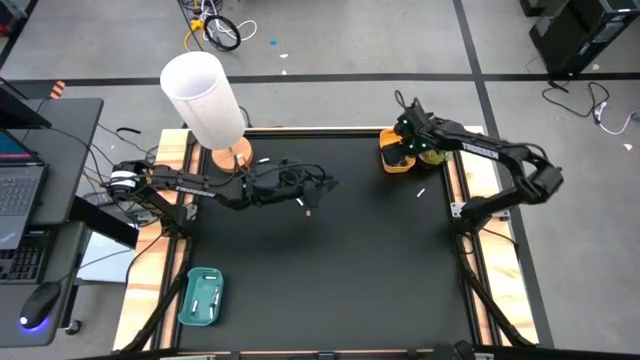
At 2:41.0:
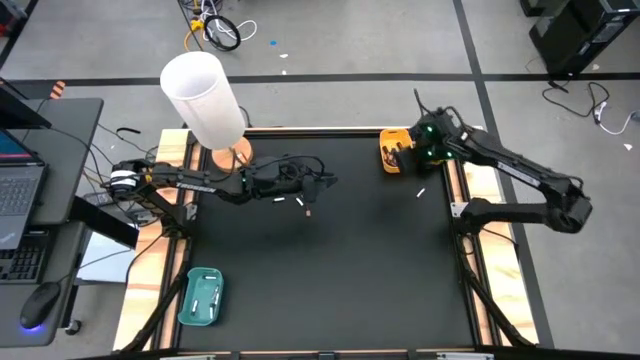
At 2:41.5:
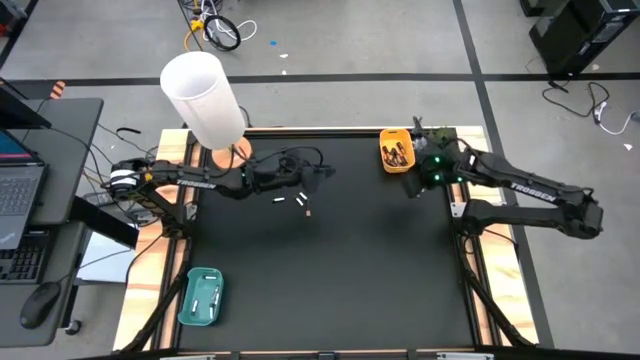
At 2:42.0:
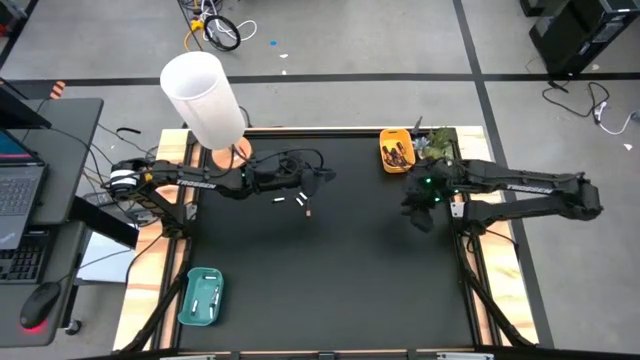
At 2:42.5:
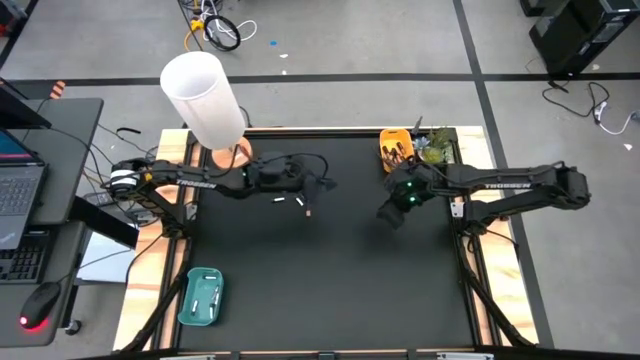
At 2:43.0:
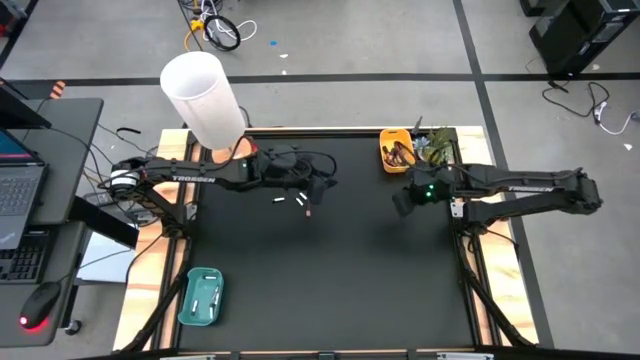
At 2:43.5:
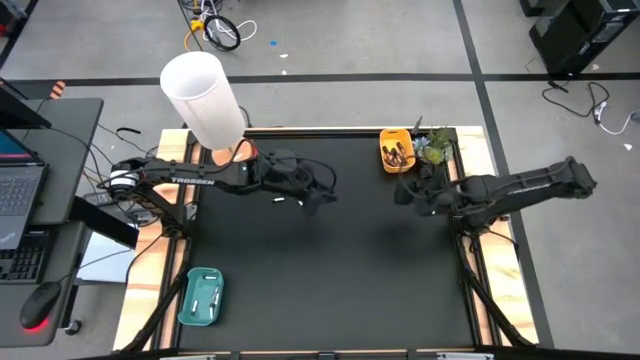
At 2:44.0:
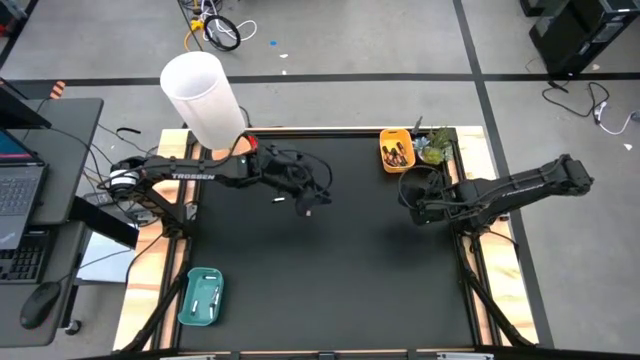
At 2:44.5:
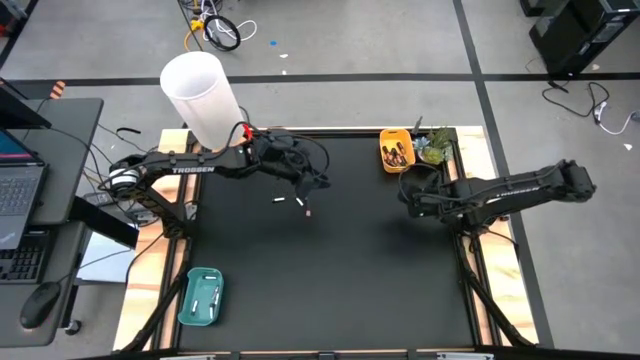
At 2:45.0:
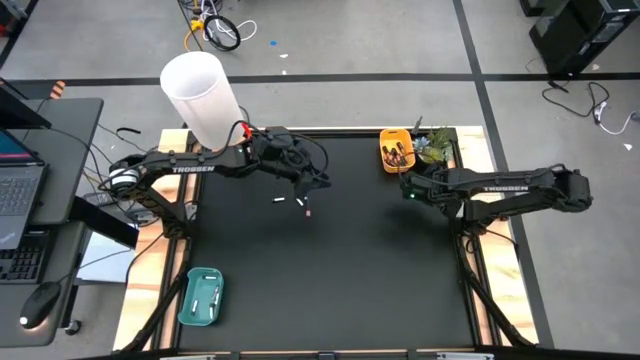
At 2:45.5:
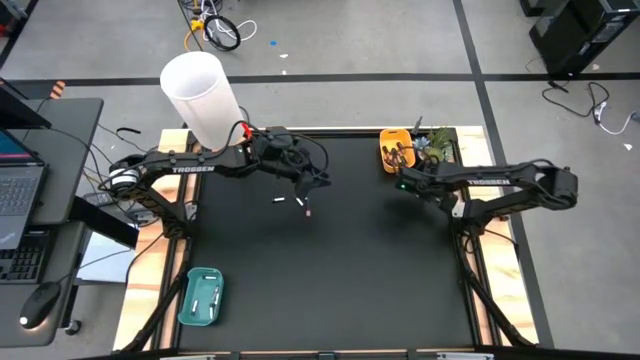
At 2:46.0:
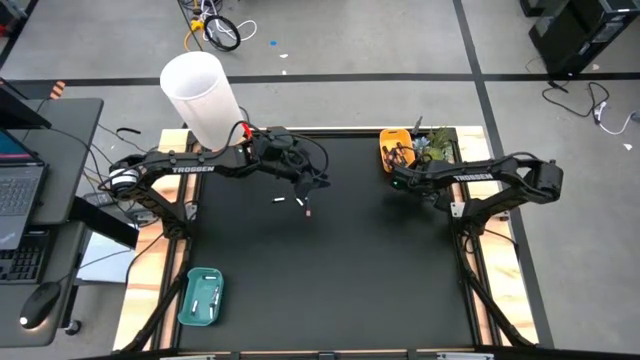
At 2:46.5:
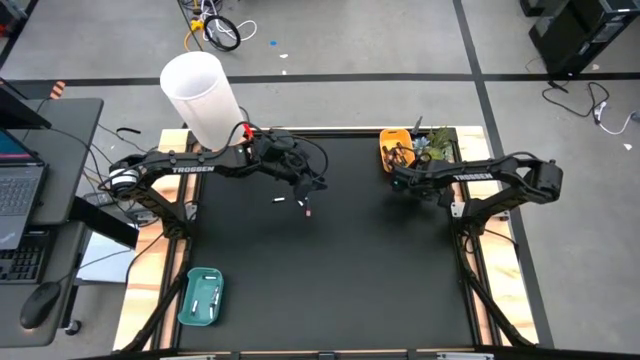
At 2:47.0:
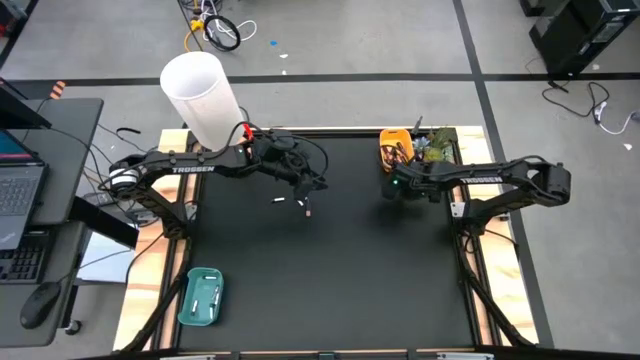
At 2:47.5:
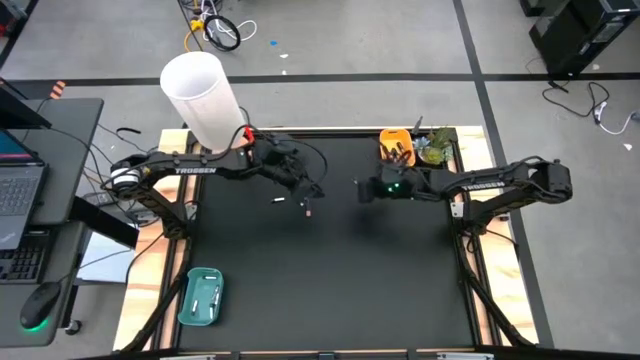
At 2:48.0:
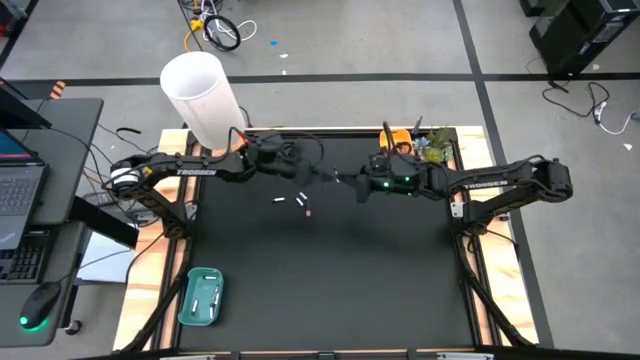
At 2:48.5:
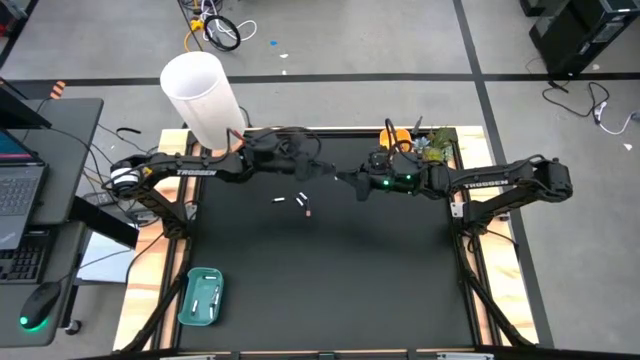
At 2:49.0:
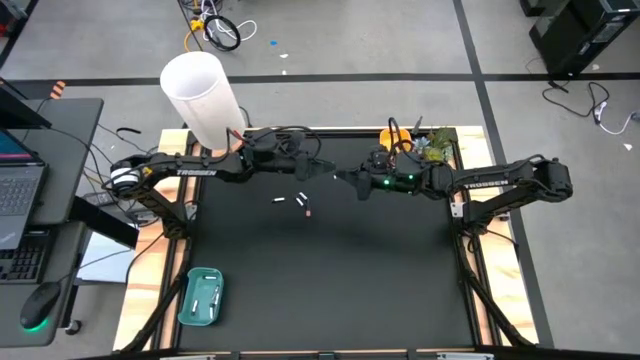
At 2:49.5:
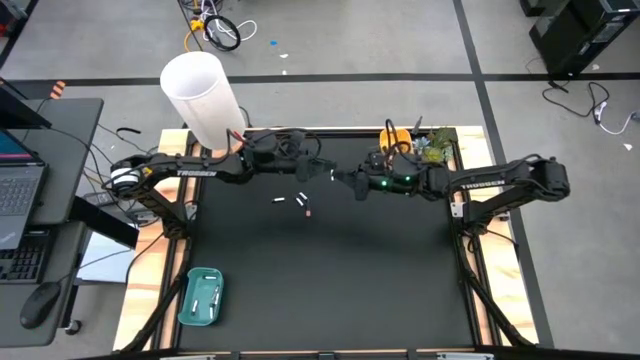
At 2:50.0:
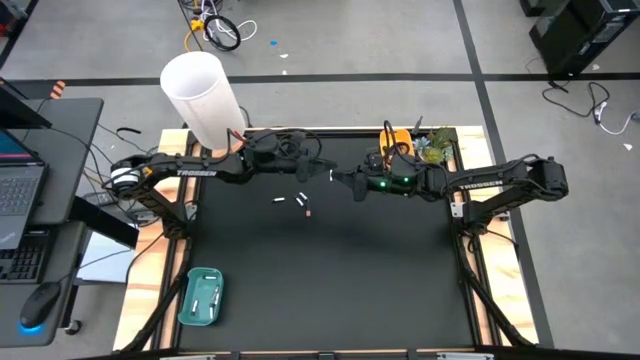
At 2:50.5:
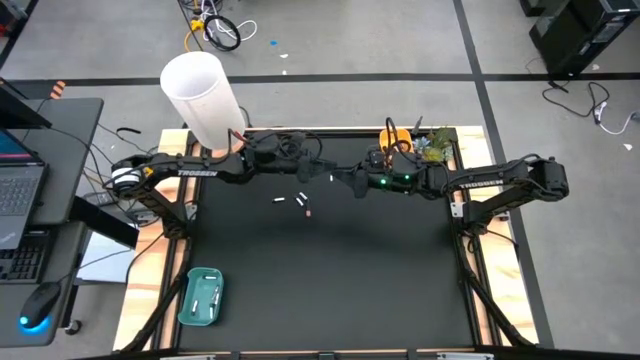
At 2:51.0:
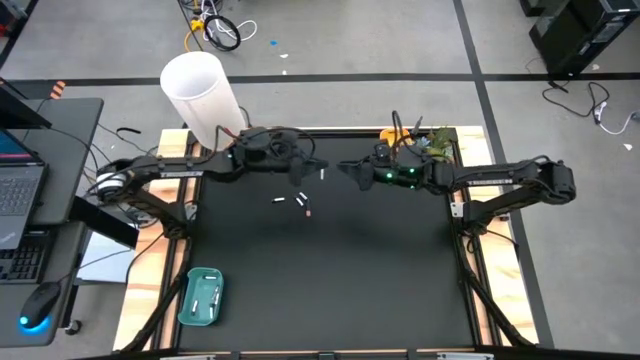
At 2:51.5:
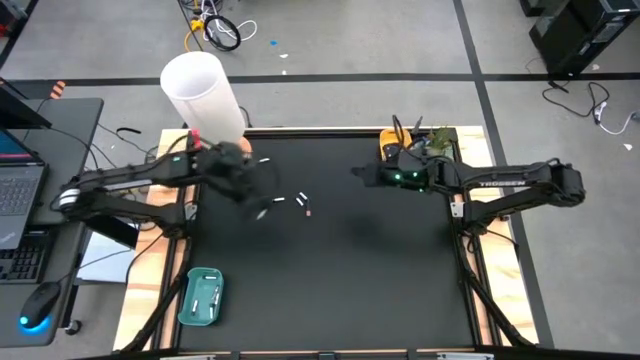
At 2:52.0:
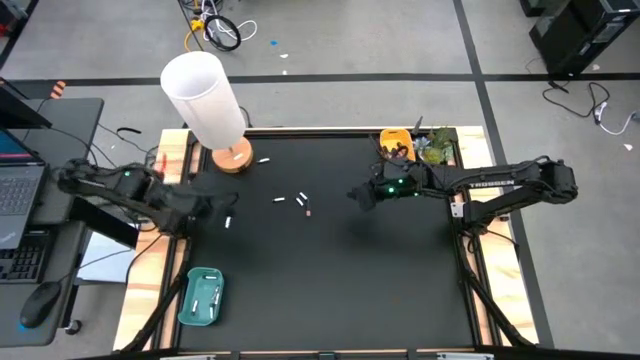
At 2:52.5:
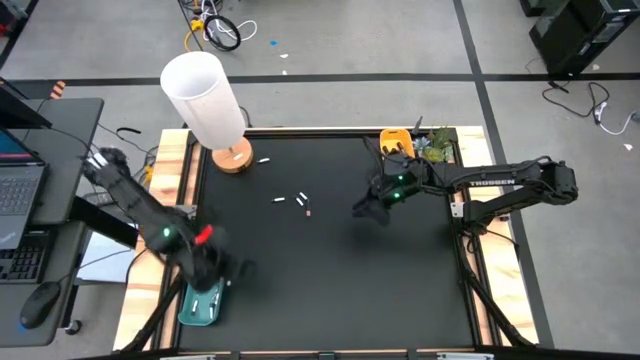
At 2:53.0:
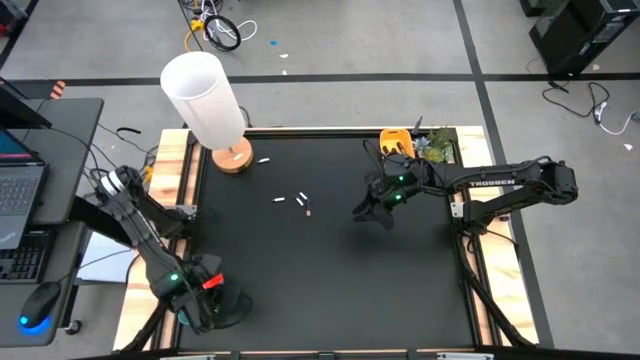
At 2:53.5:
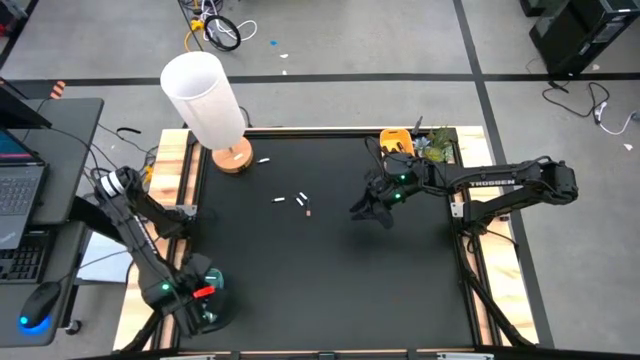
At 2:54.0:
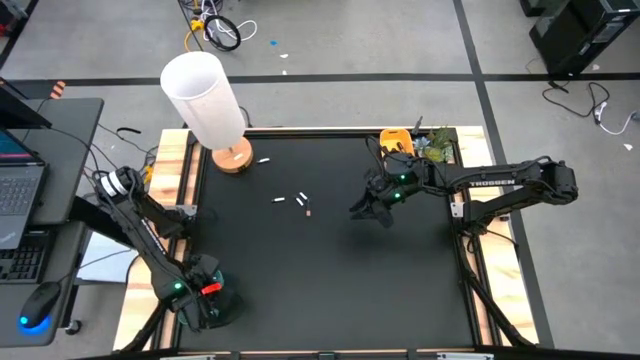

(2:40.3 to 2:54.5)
Task: Sort batteries
Put the silver battery into the blue bin

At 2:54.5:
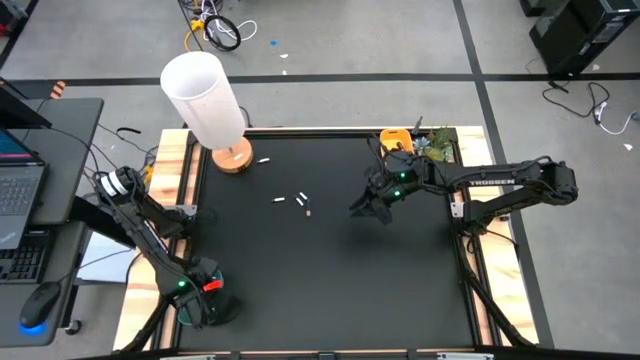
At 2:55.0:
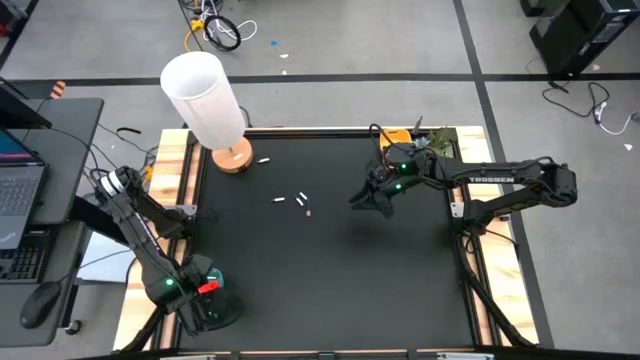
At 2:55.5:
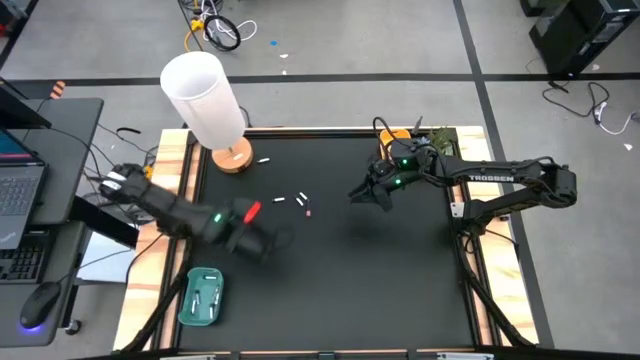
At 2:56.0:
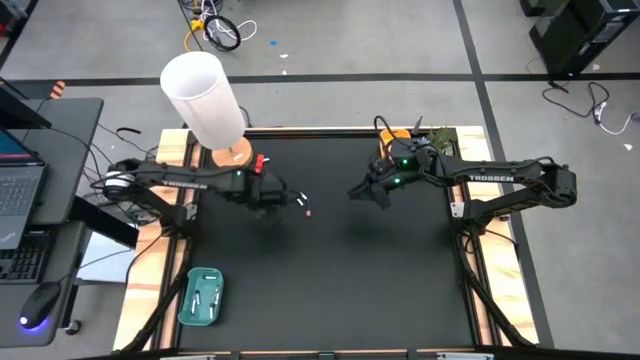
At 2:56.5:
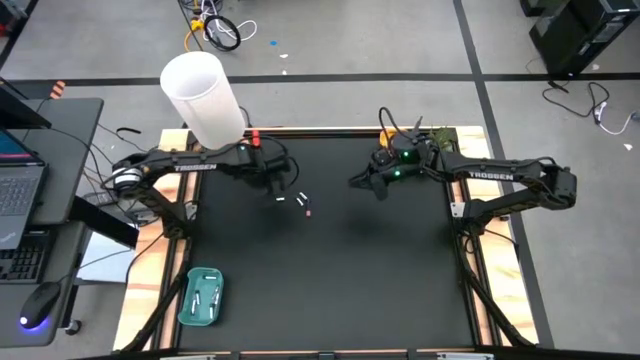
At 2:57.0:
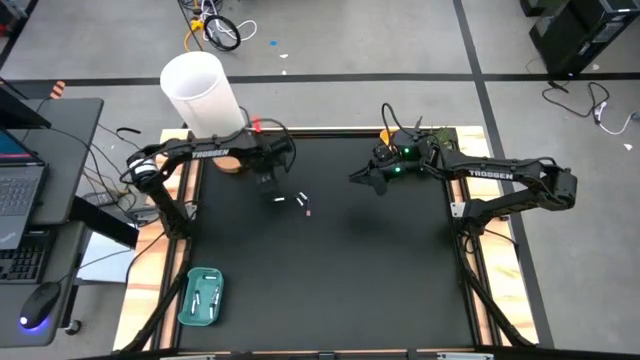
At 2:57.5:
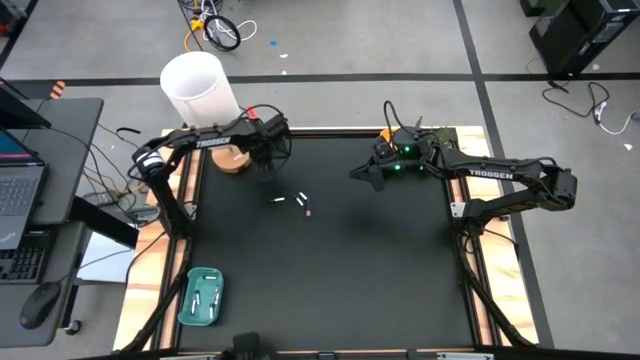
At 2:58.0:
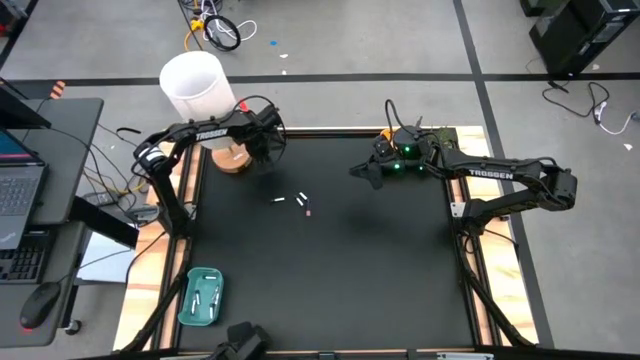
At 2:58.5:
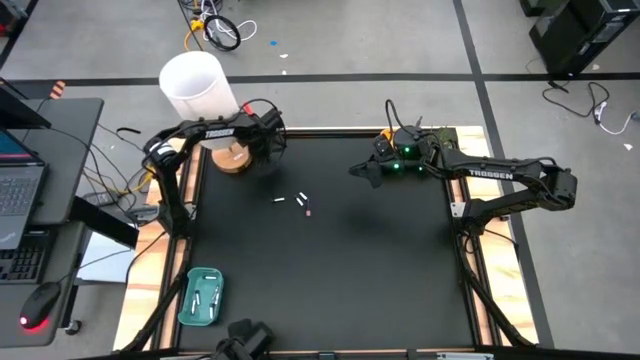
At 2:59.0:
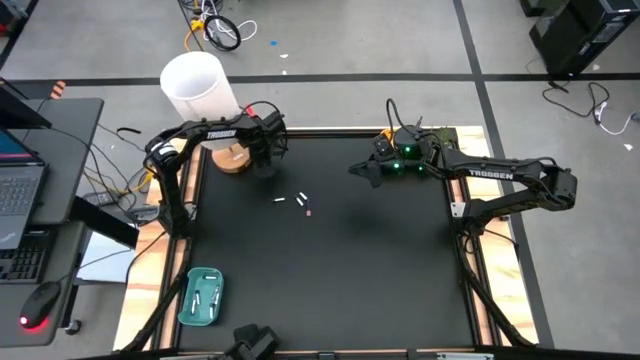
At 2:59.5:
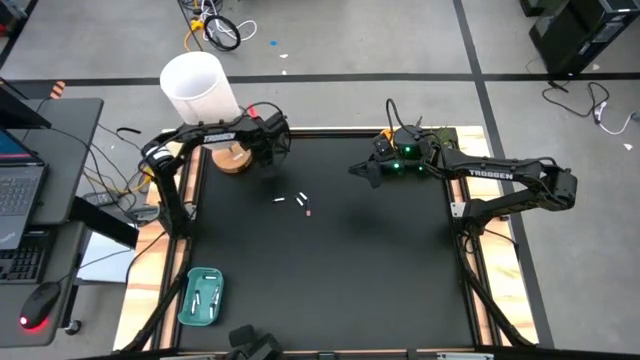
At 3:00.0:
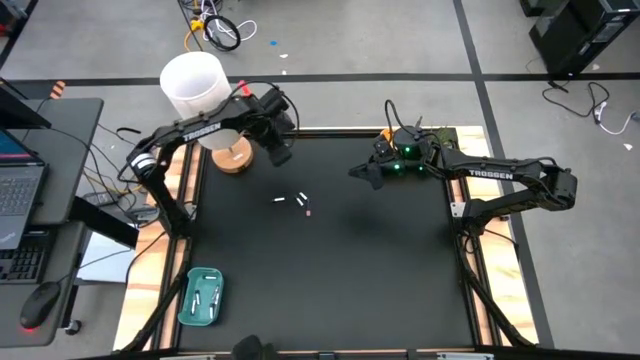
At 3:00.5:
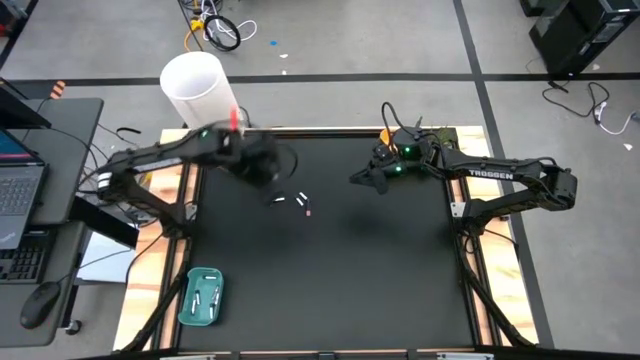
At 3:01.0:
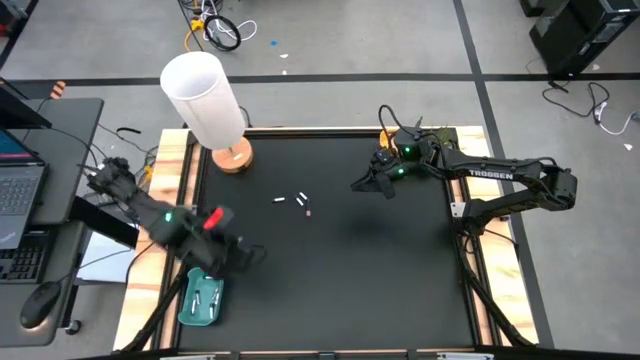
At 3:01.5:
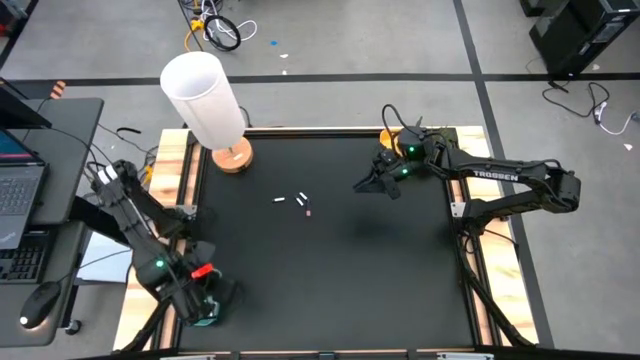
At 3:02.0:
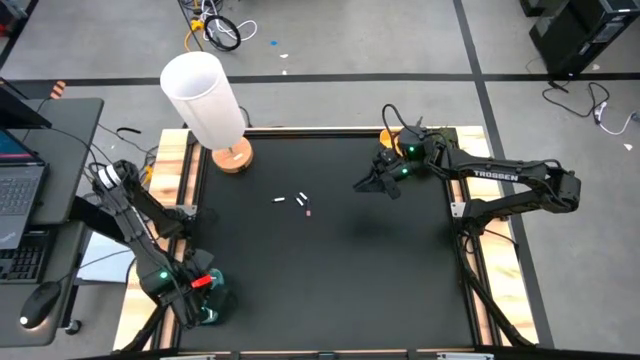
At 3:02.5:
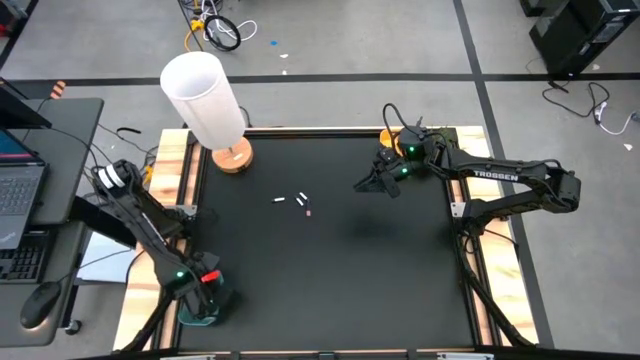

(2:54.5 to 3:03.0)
Put the silver battery into the blue bin
